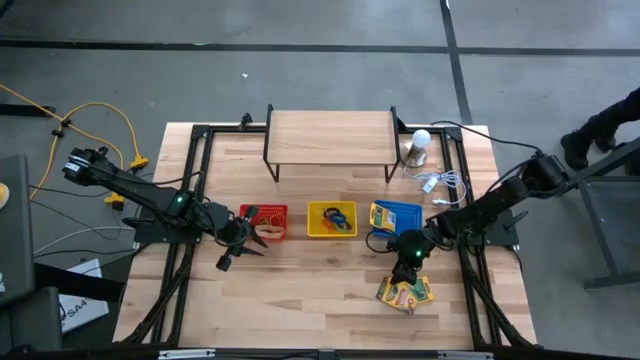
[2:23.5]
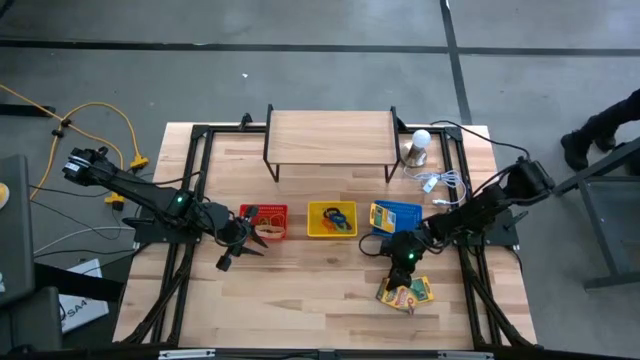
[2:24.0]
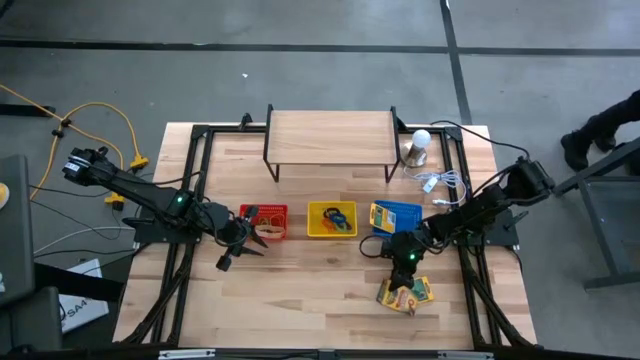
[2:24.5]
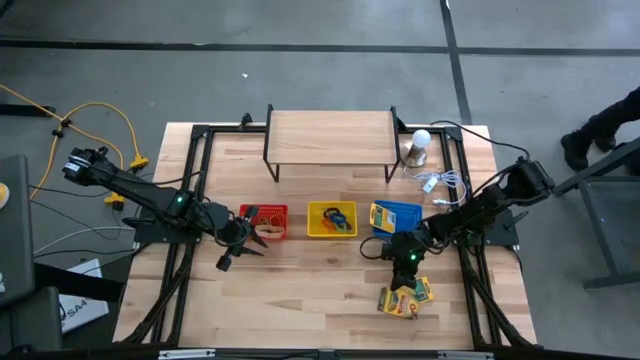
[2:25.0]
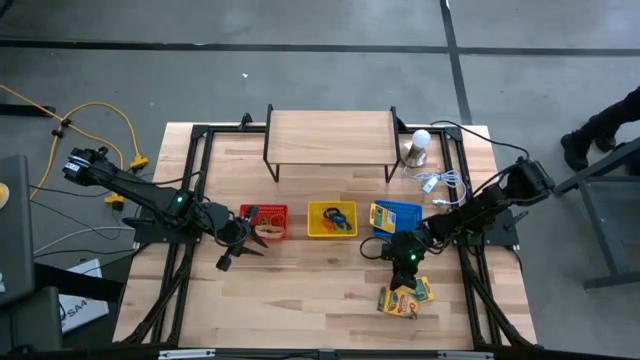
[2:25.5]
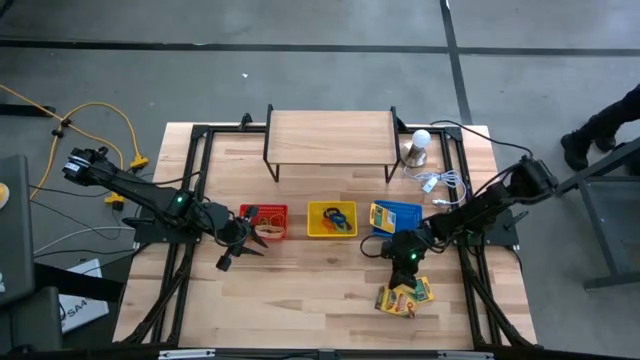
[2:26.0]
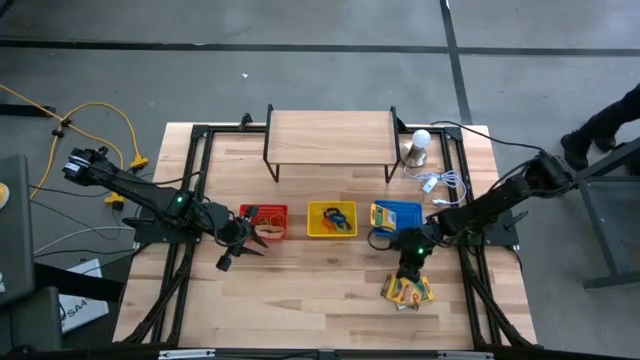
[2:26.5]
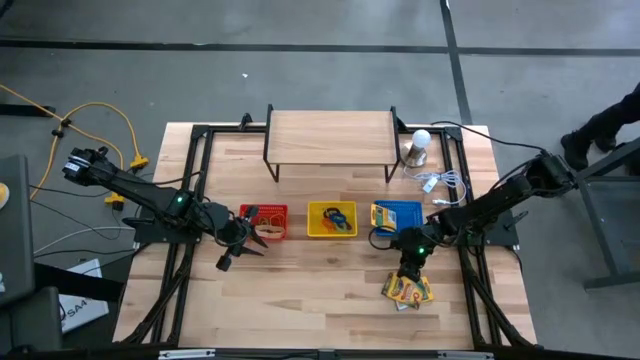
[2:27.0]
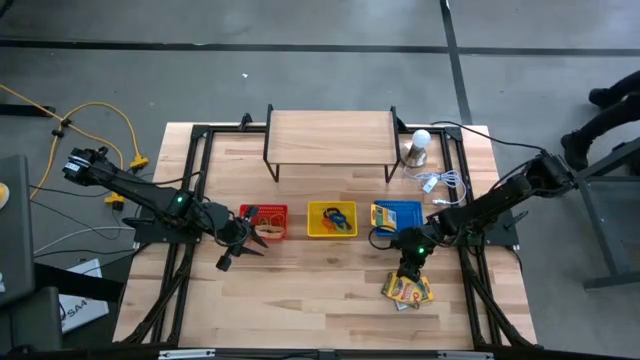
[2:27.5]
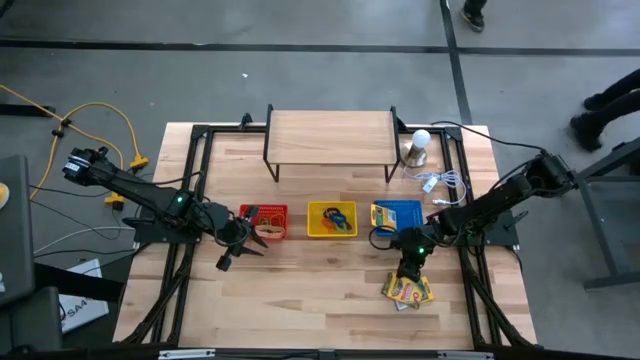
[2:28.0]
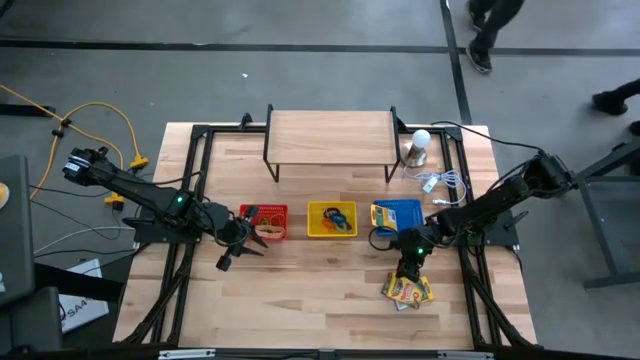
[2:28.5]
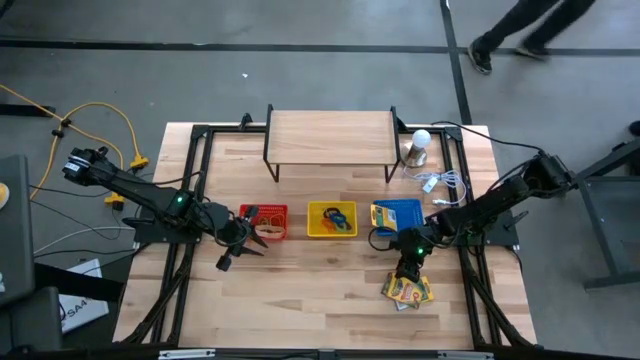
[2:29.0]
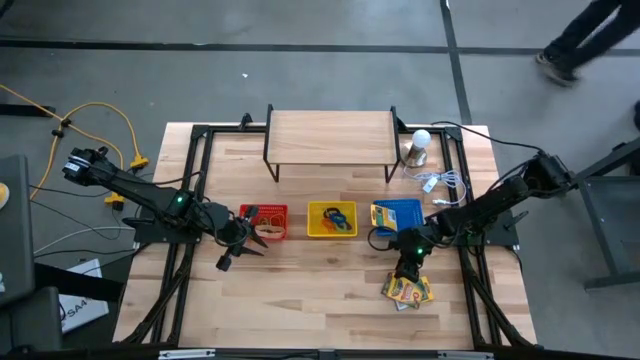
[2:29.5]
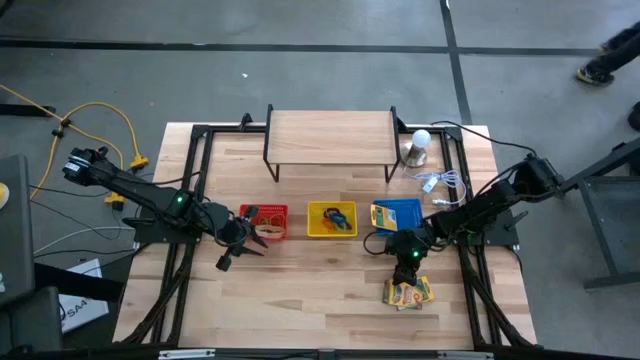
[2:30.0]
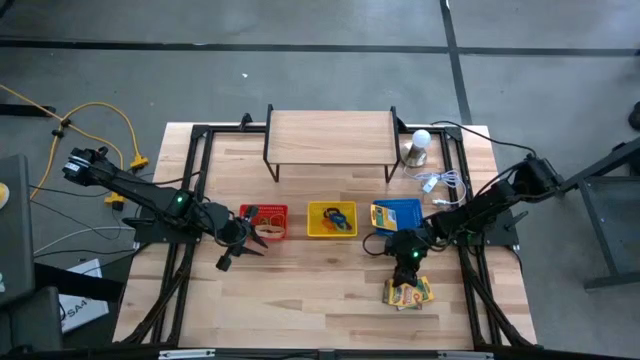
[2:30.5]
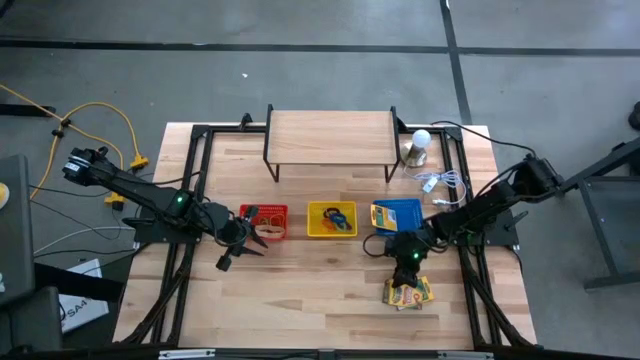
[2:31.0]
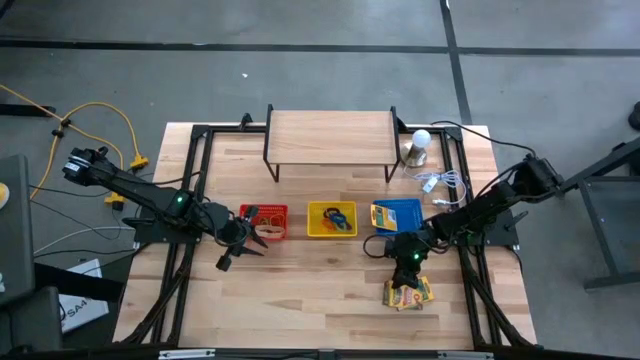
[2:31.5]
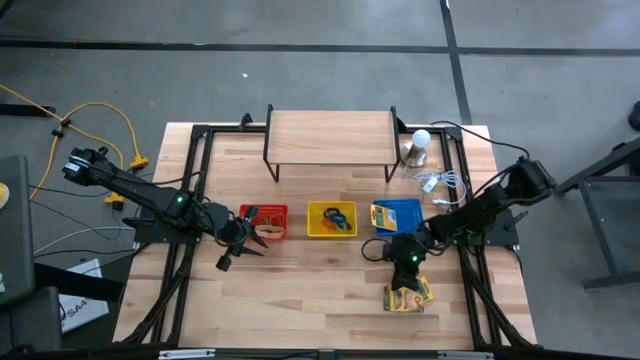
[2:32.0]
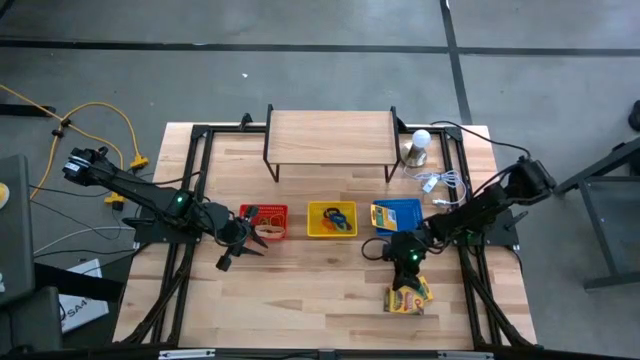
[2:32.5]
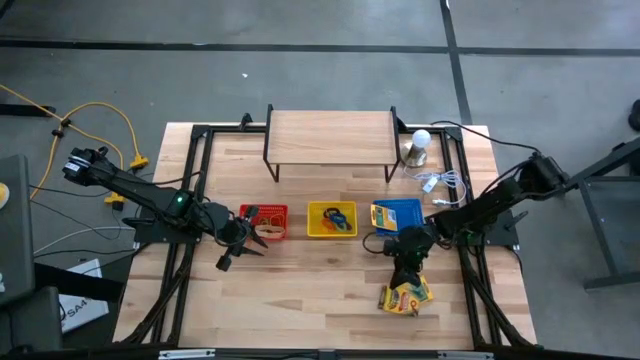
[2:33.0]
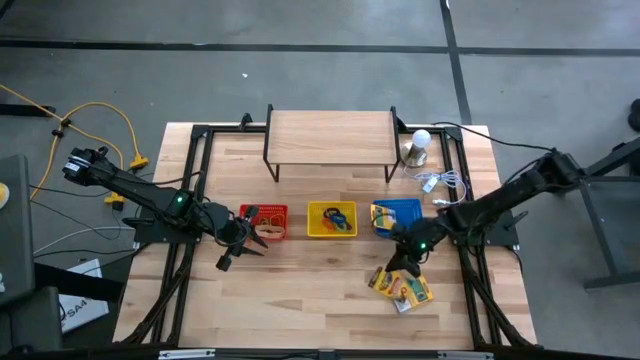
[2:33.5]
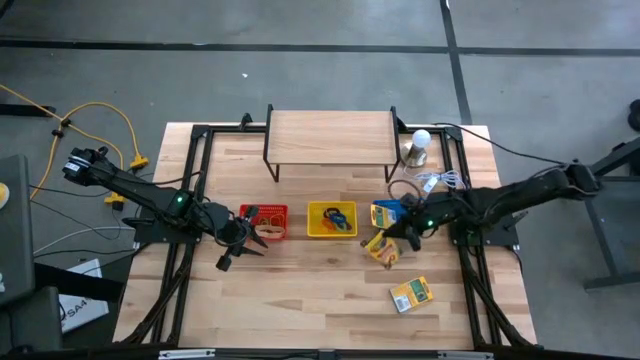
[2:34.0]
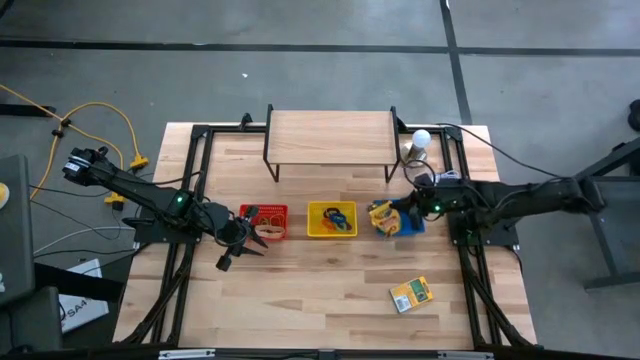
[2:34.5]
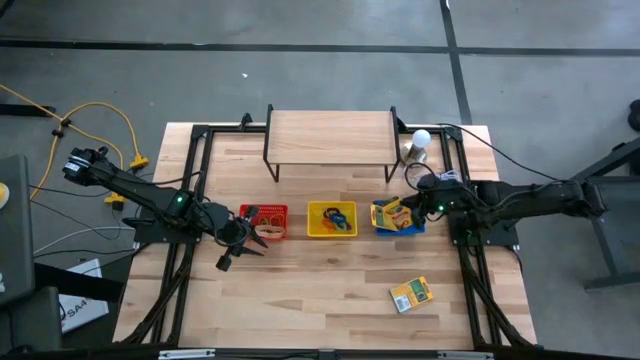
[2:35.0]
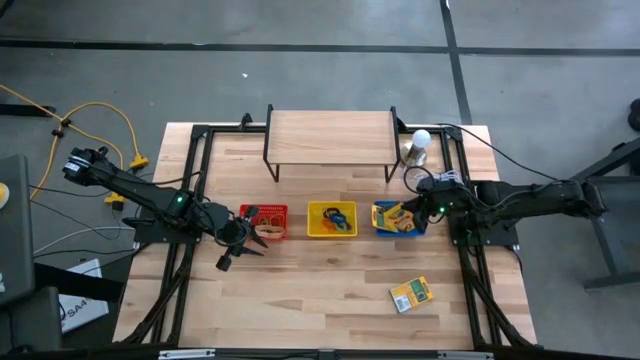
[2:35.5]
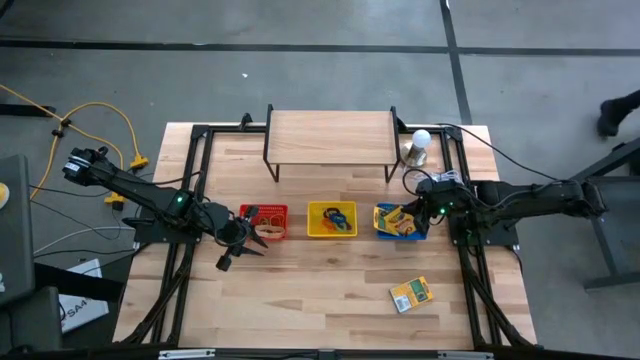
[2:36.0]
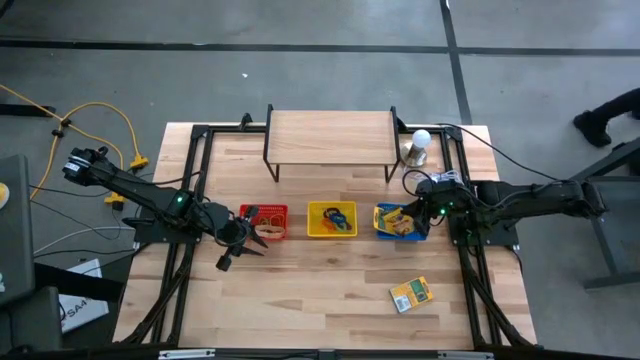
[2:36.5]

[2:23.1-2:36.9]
Task: Pick & Place Office Desk Supplies
Put the box of crayons into the blue bin

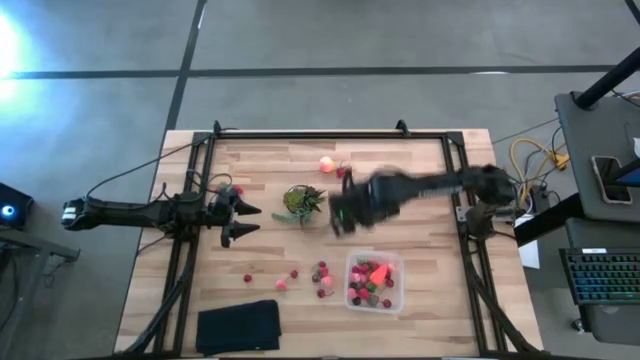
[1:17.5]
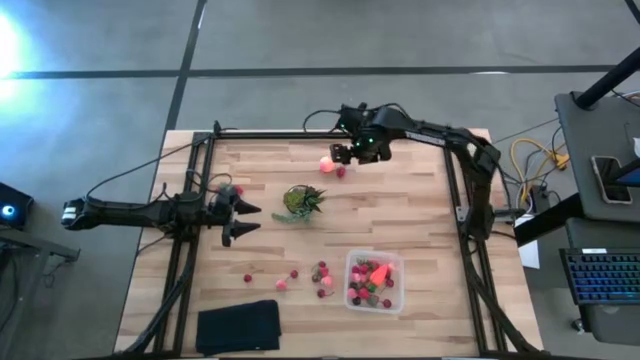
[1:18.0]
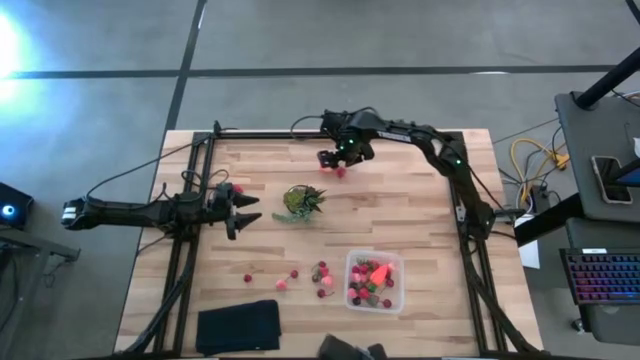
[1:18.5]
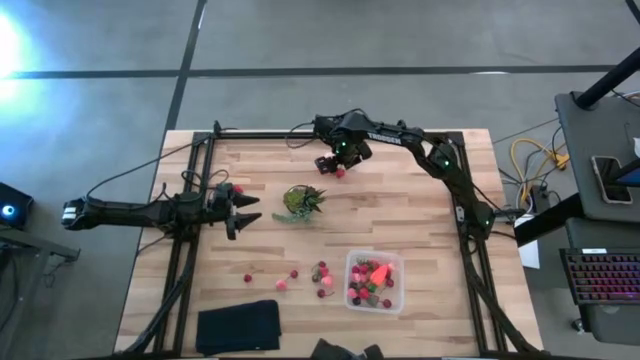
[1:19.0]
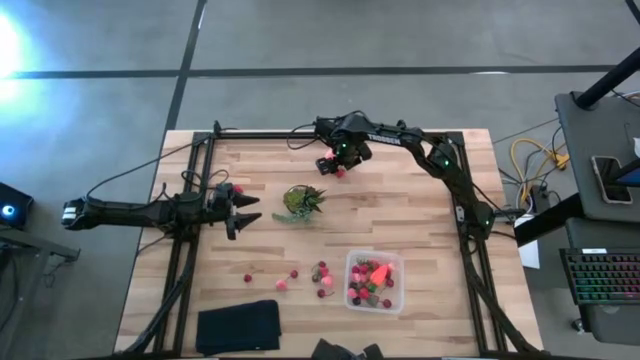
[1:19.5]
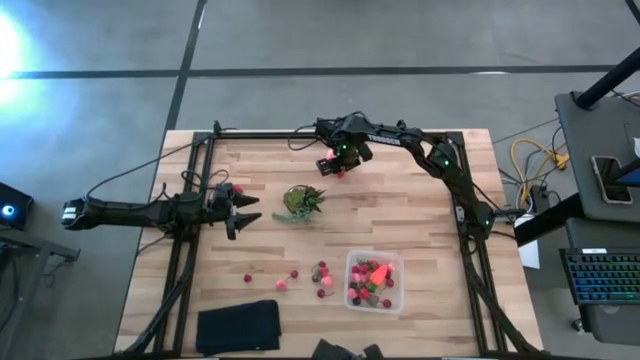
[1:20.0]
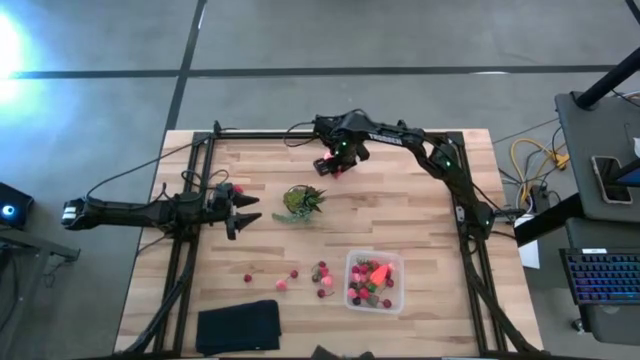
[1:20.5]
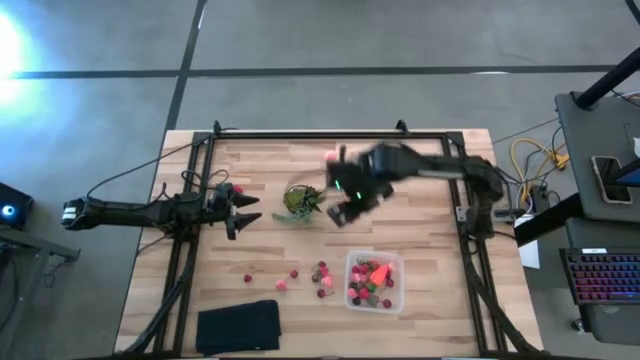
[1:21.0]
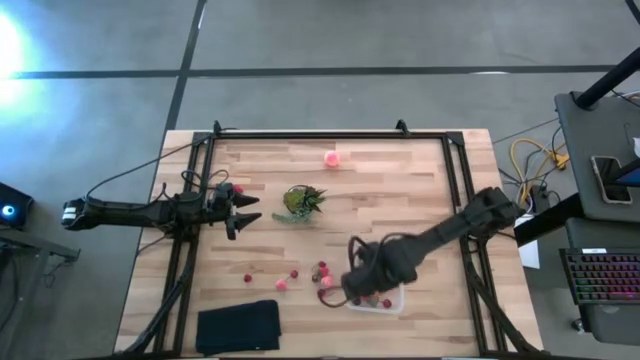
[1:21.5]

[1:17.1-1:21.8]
Task: Pick and placing Produce into tupperware
Put the strawberry into the bin

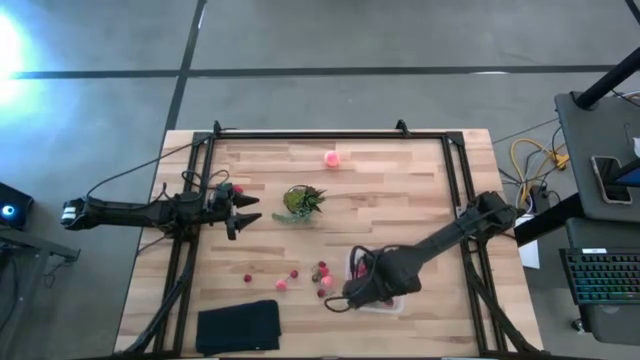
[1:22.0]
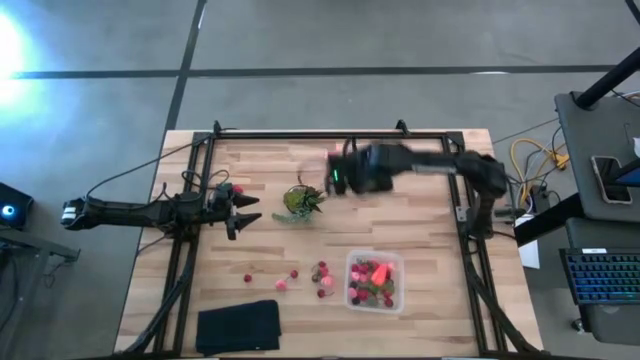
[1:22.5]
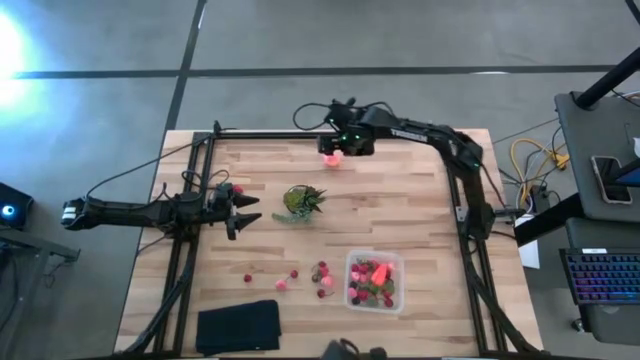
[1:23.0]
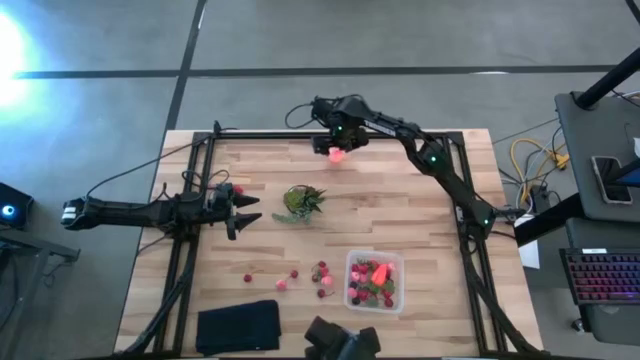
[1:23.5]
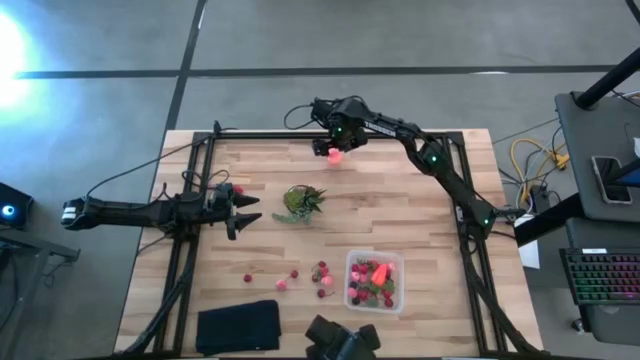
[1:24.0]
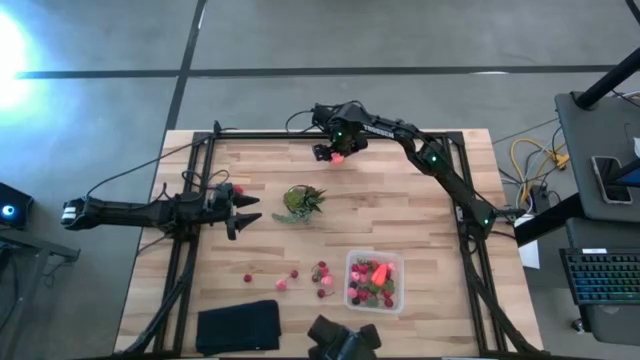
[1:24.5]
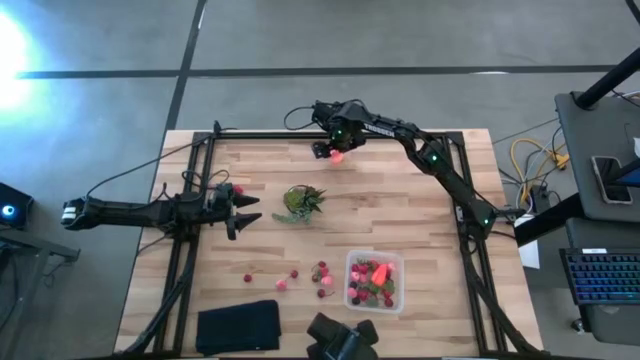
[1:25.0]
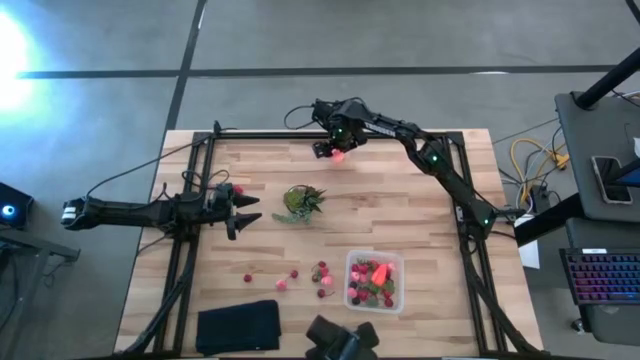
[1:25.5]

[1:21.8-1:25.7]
Put the peach into the bin
